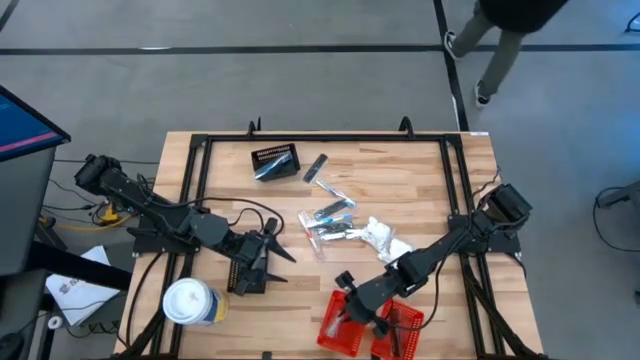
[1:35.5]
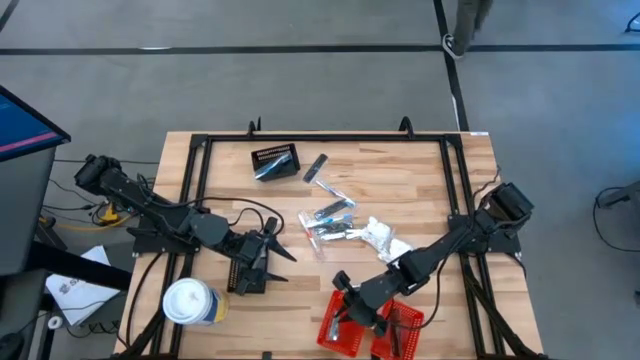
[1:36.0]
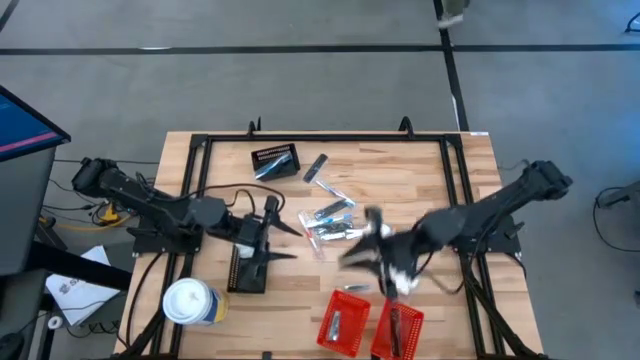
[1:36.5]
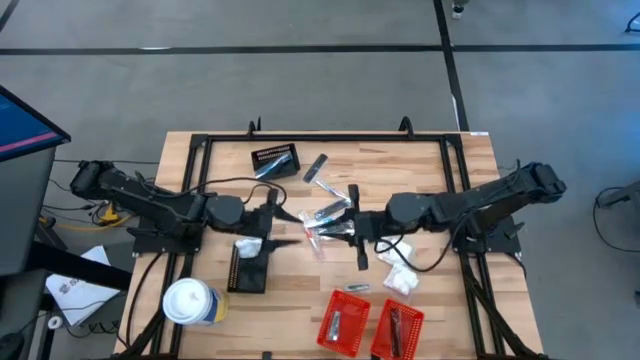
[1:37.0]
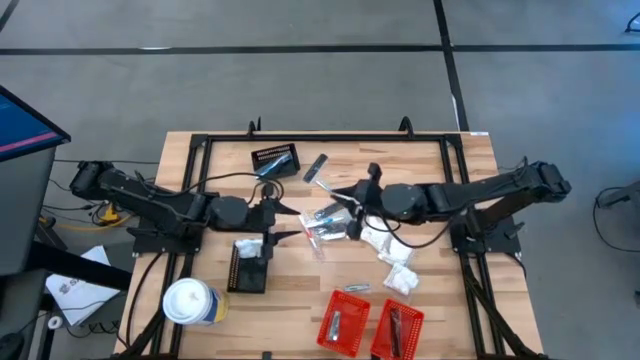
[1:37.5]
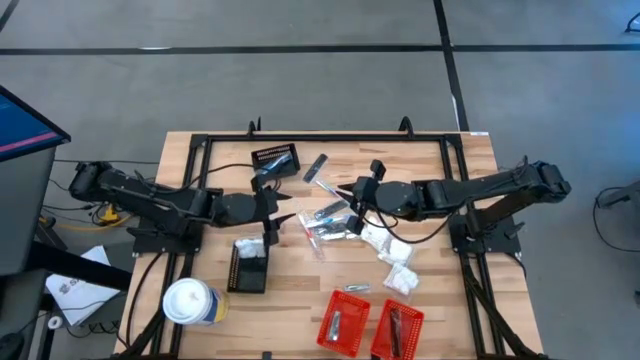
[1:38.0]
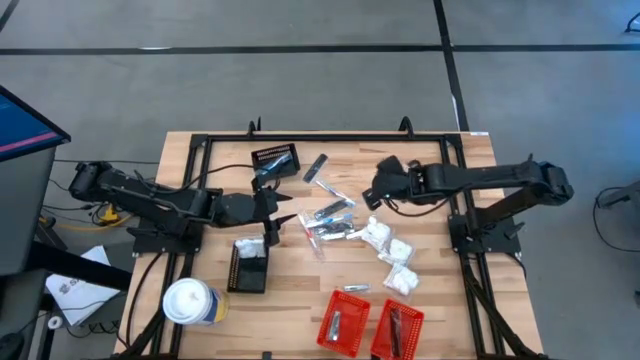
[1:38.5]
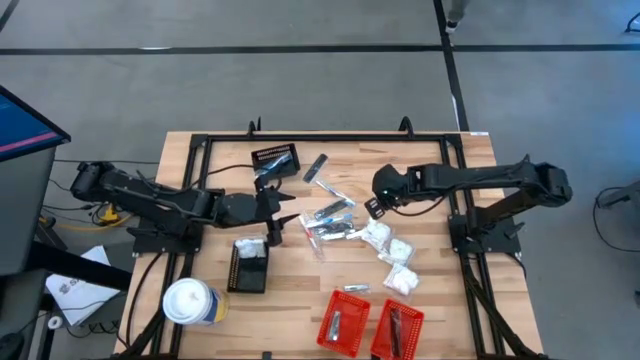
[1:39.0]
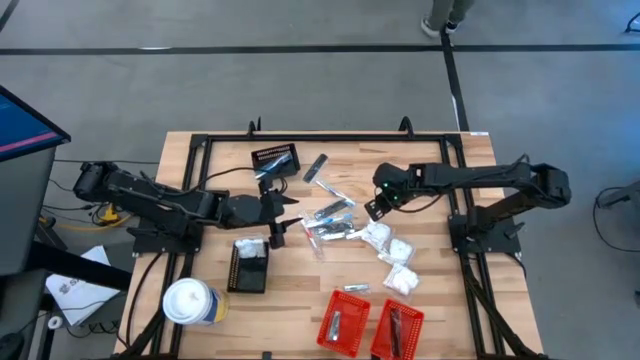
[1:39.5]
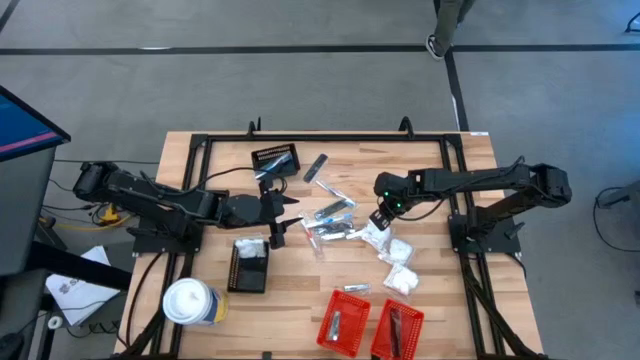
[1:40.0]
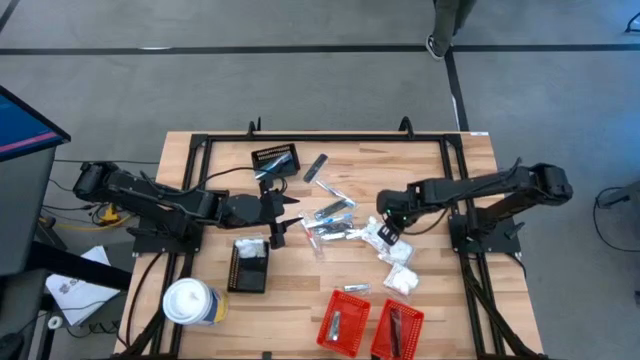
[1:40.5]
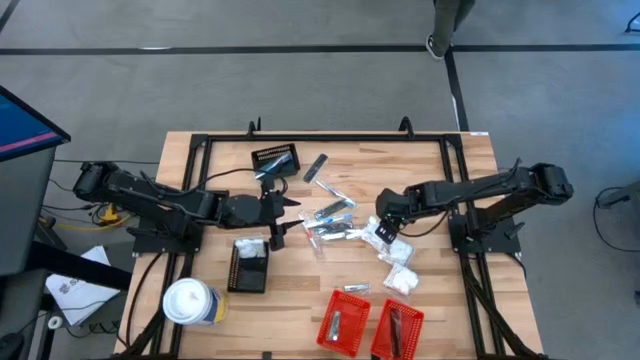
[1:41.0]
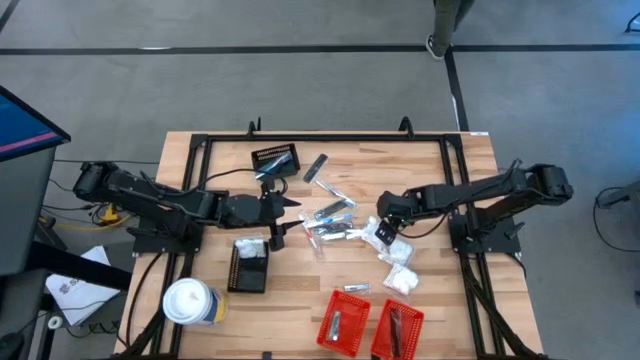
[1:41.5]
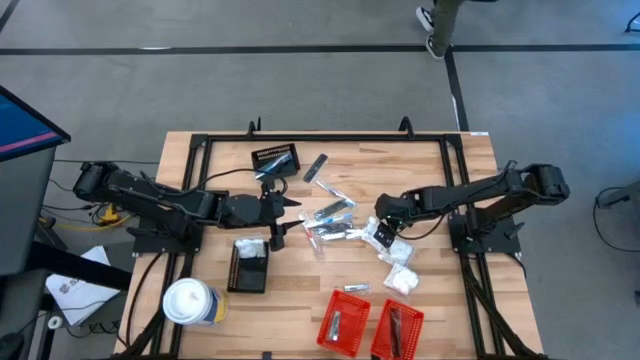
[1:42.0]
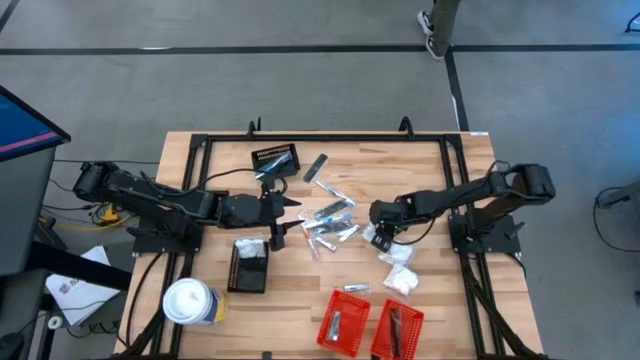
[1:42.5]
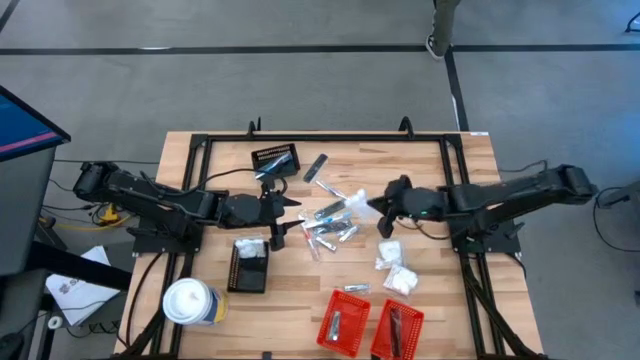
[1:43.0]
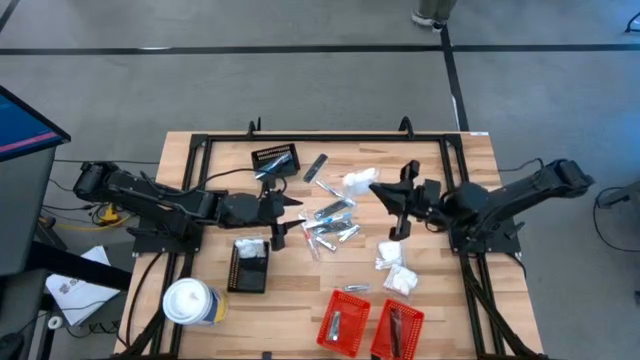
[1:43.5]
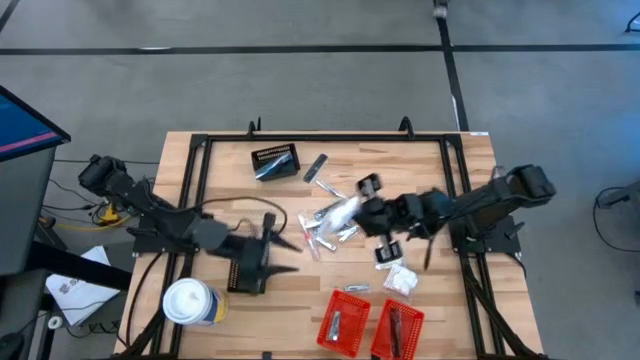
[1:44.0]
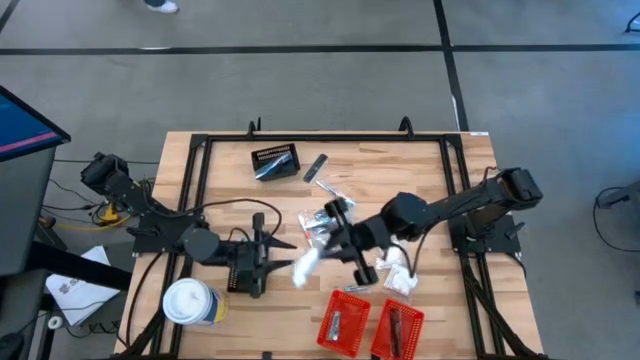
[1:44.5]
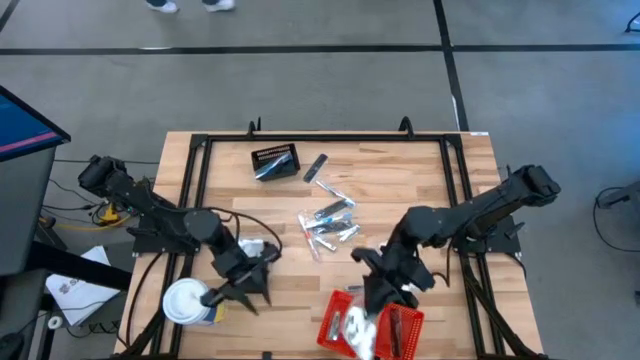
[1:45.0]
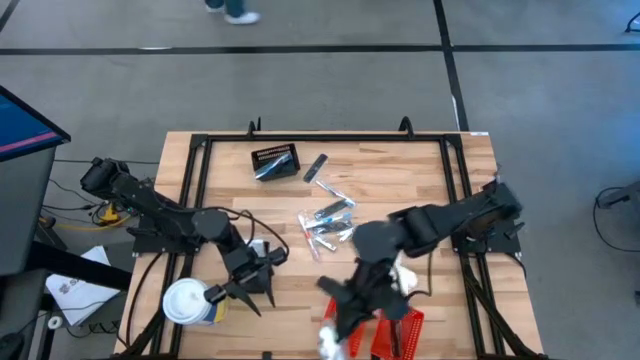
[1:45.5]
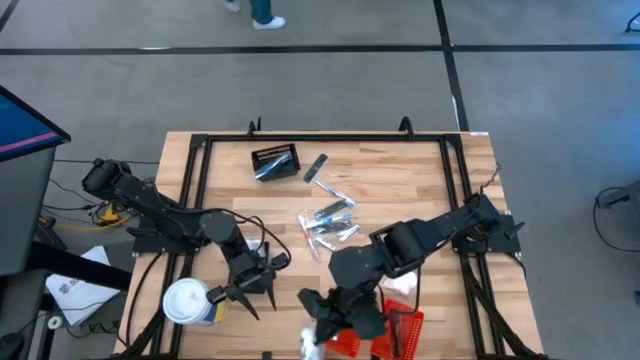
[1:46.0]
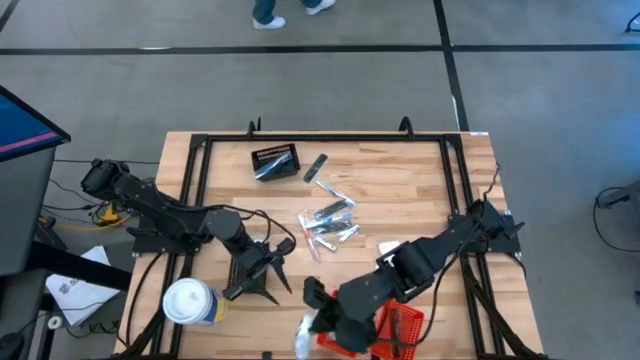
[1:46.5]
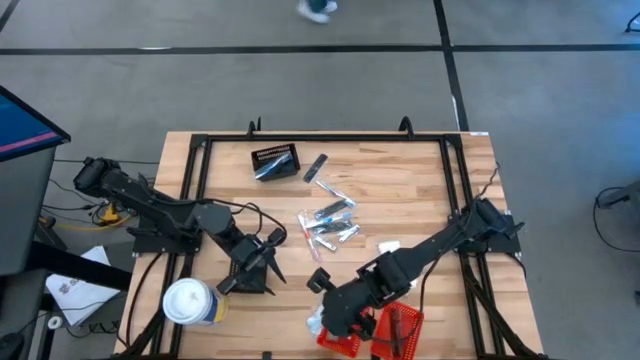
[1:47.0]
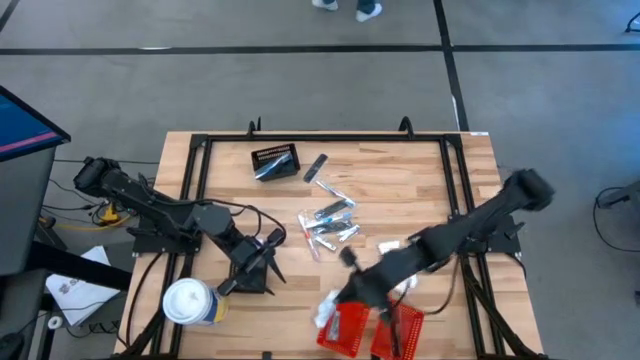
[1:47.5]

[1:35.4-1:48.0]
Task: Pick & Place Travel size toiletries
Put the cotton pack into the bottom black bin

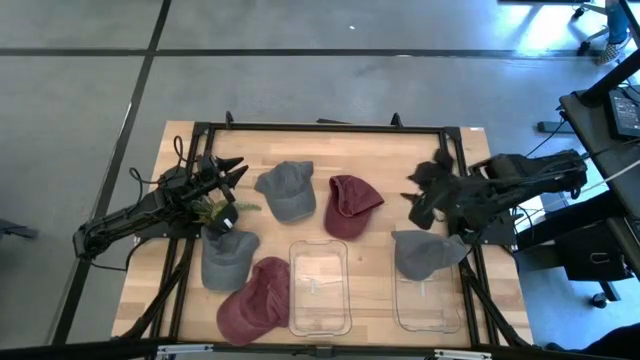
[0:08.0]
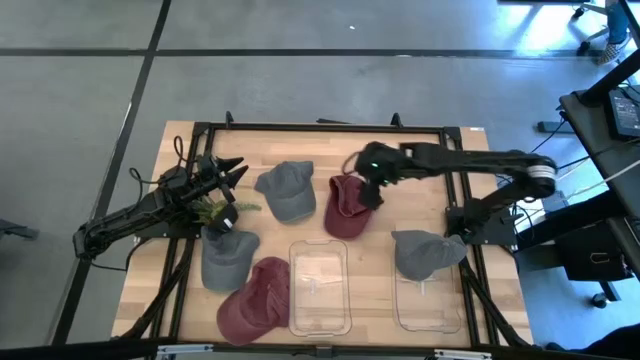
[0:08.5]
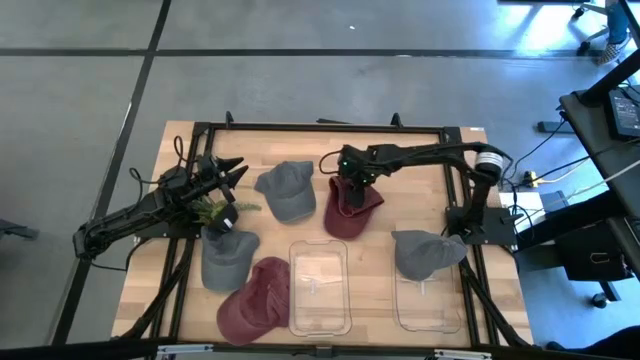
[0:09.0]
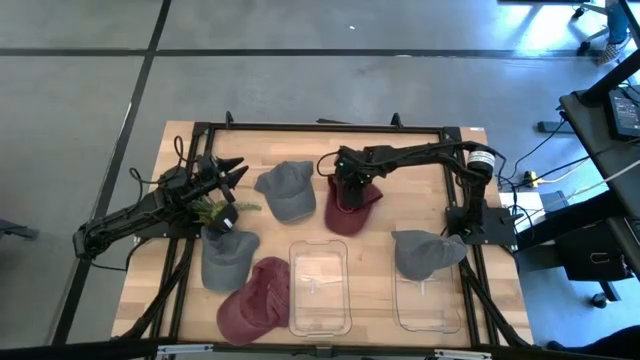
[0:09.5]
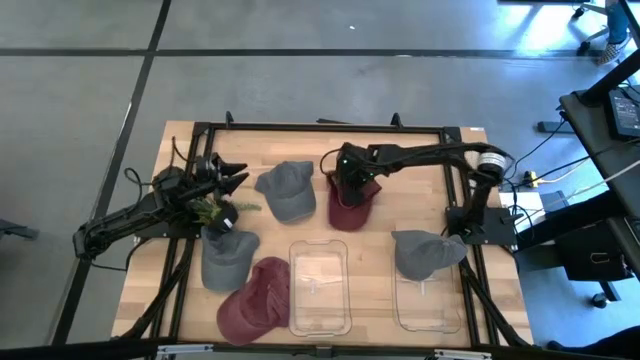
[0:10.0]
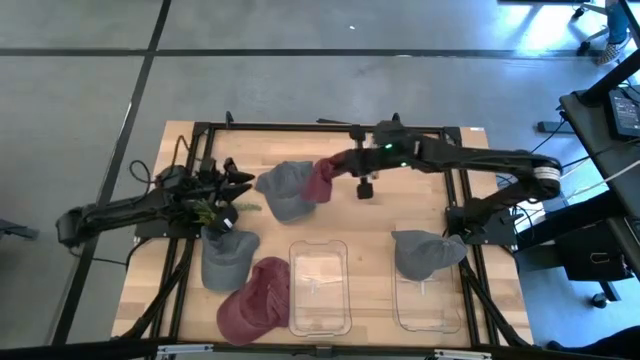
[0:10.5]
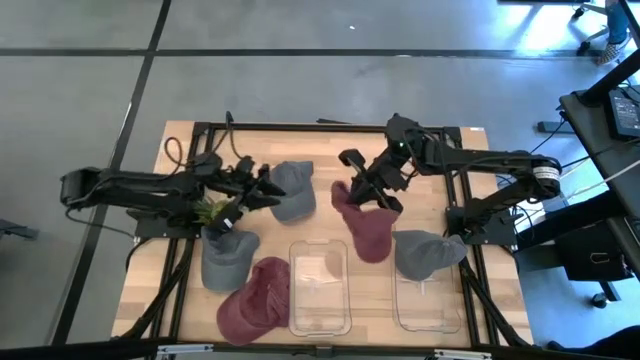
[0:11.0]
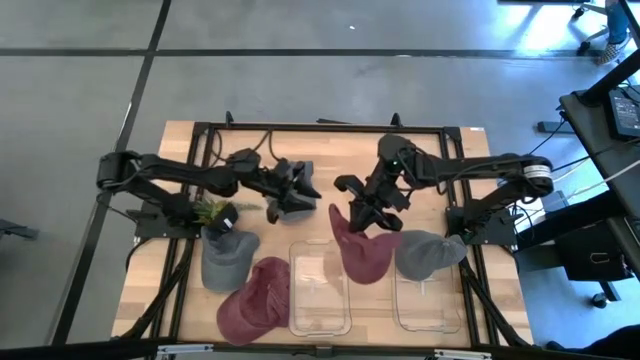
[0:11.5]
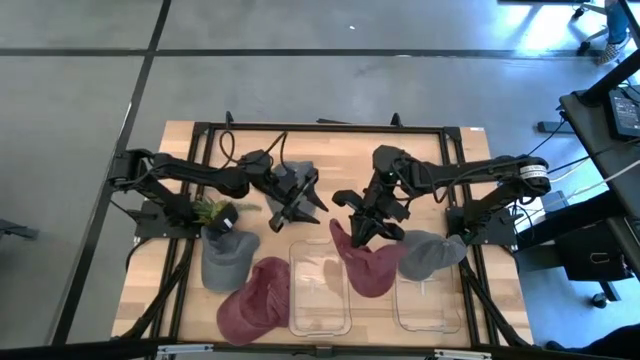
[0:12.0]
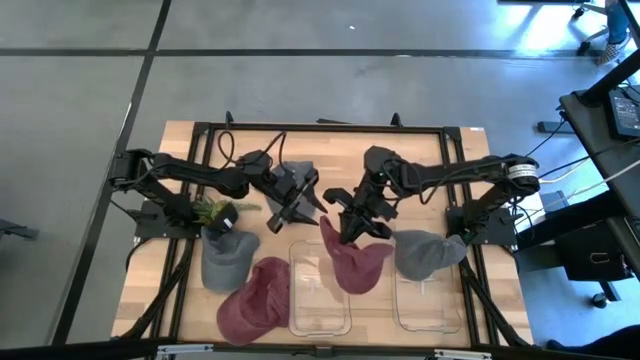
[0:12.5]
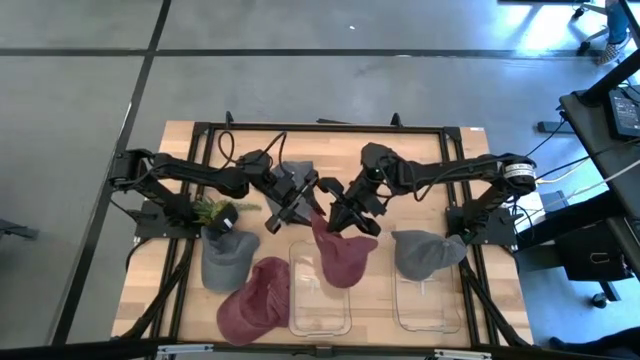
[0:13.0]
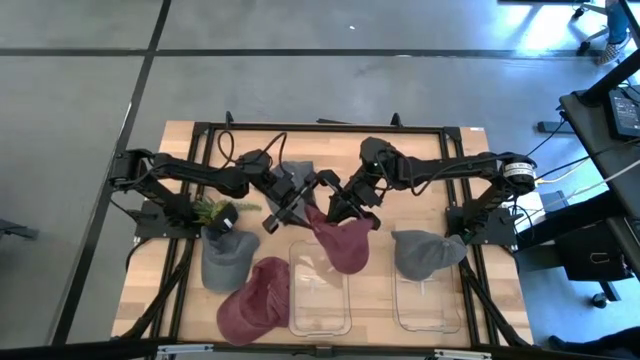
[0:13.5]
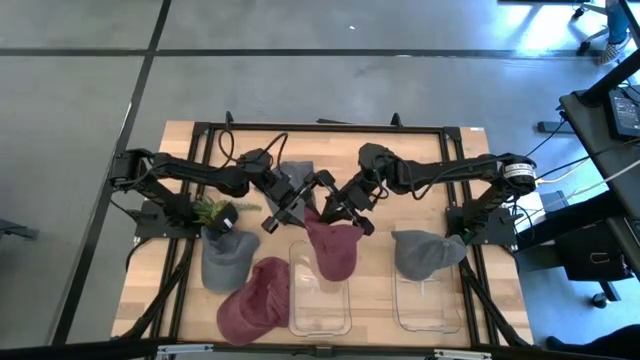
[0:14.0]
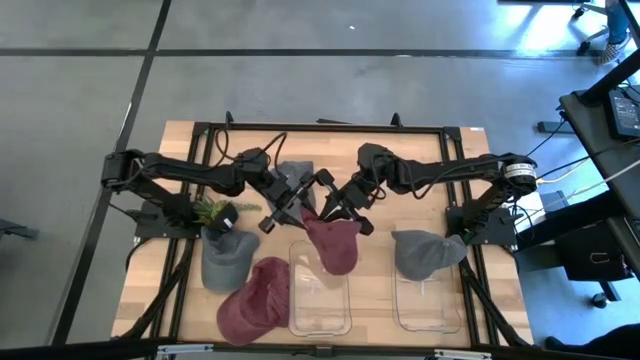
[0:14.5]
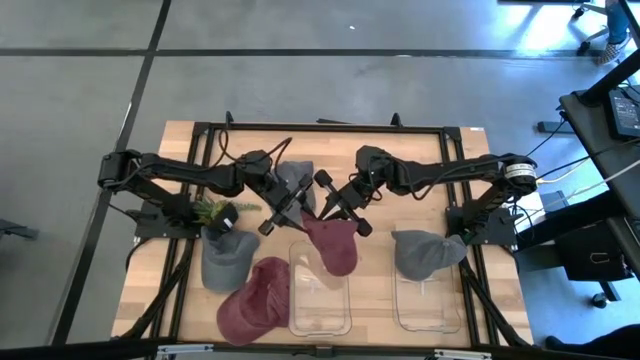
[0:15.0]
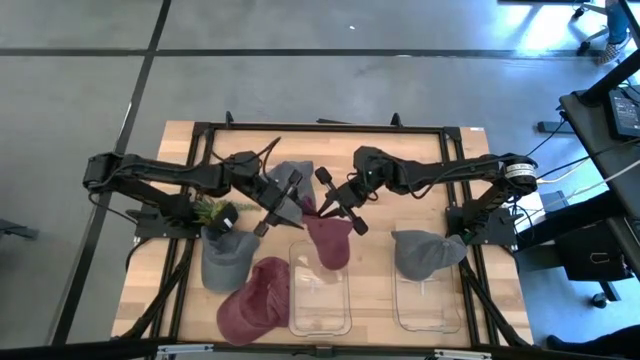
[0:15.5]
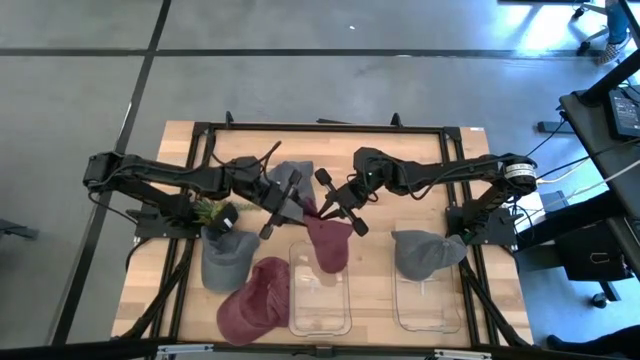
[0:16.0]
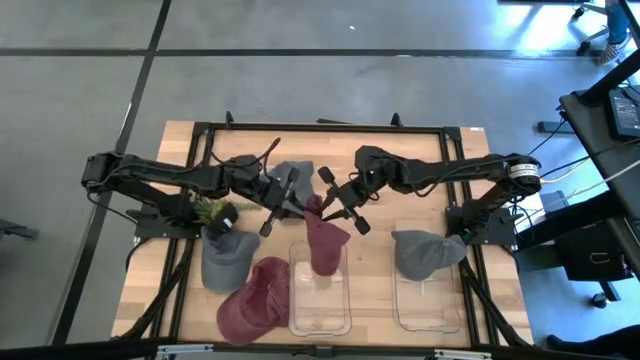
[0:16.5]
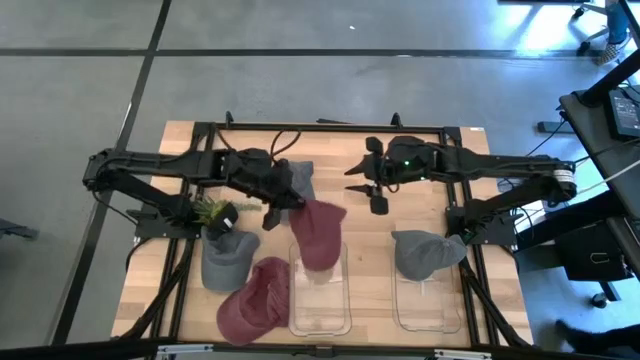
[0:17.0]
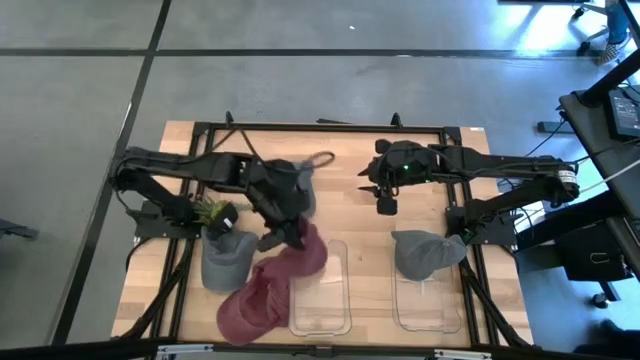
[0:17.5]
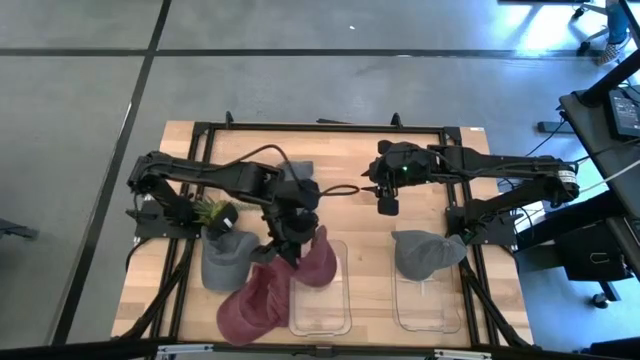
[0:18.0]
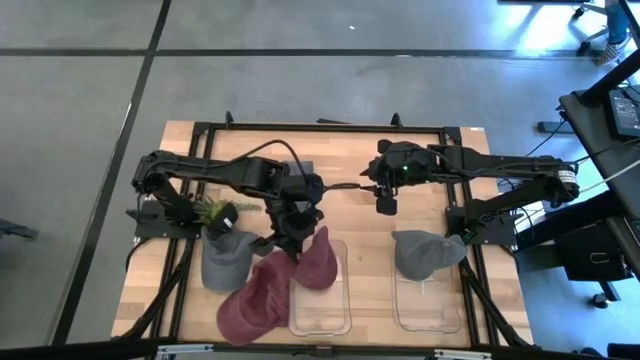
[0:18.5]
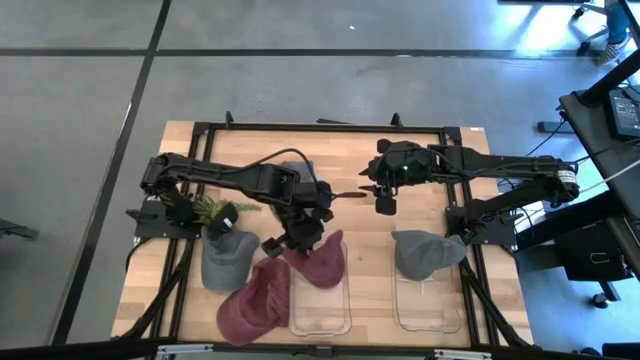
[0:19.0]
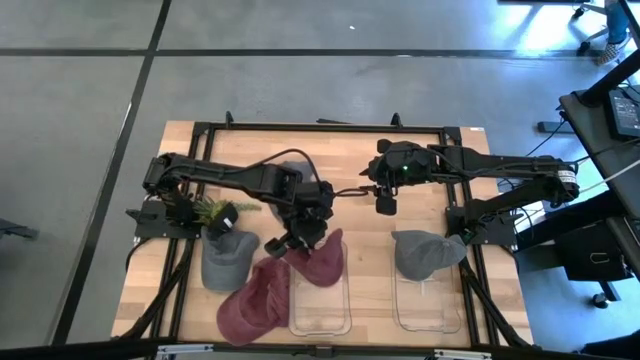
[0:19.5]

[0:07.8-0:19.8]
Task: Pick & Place hat
Put the top red cap into the left transparent bin
